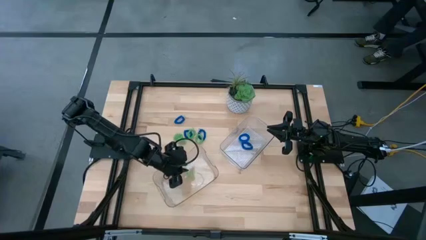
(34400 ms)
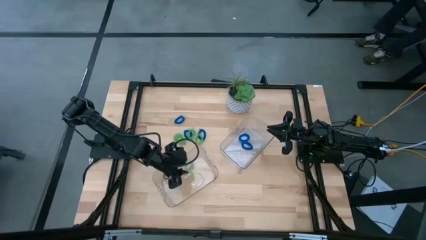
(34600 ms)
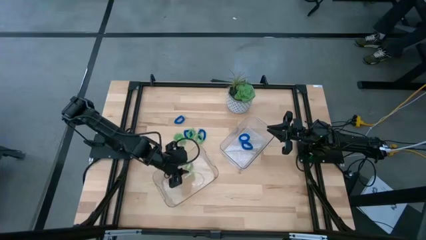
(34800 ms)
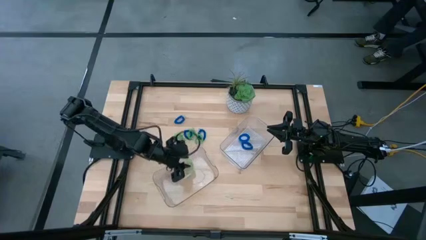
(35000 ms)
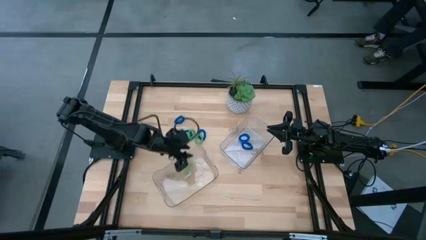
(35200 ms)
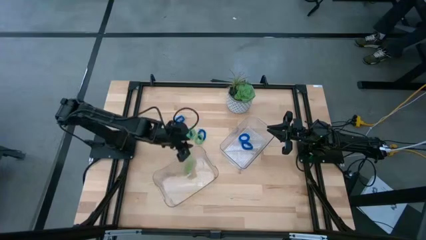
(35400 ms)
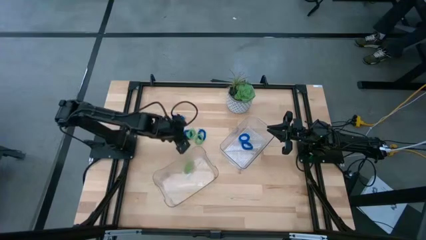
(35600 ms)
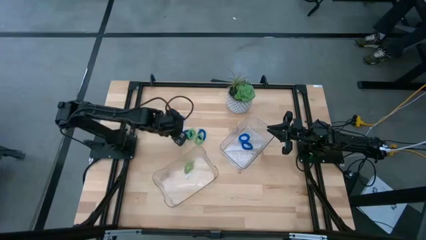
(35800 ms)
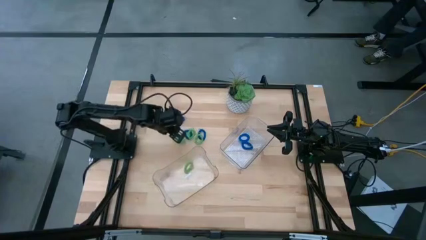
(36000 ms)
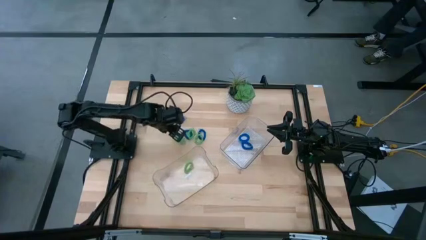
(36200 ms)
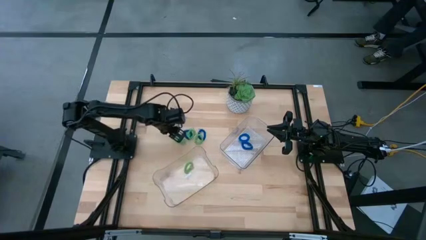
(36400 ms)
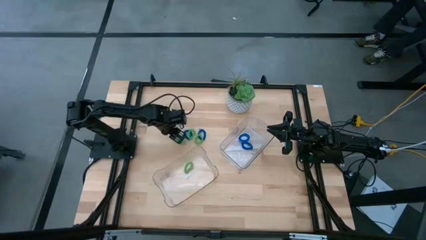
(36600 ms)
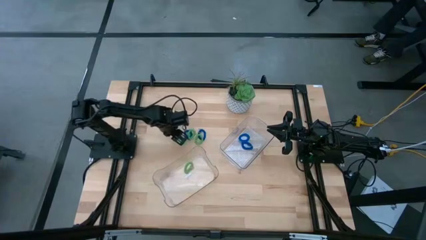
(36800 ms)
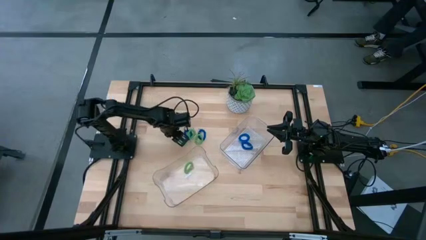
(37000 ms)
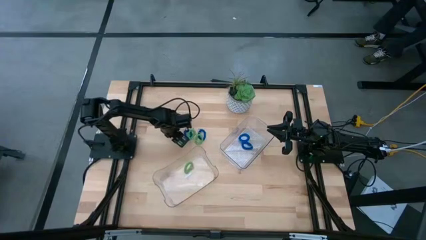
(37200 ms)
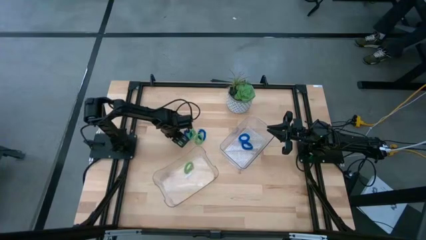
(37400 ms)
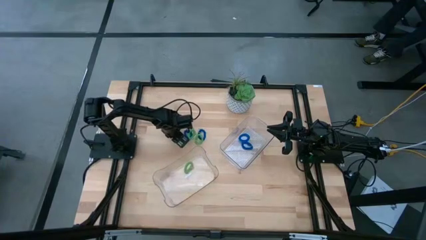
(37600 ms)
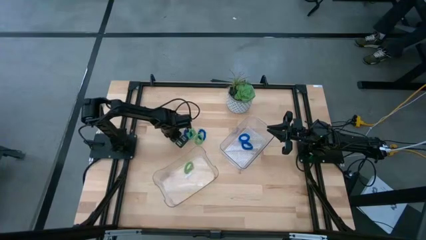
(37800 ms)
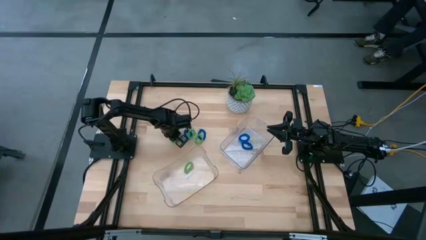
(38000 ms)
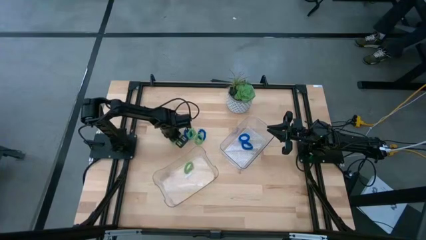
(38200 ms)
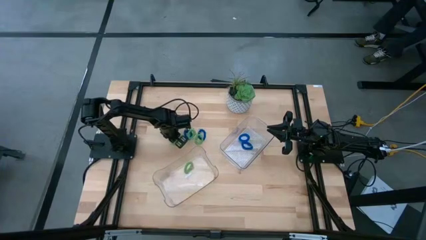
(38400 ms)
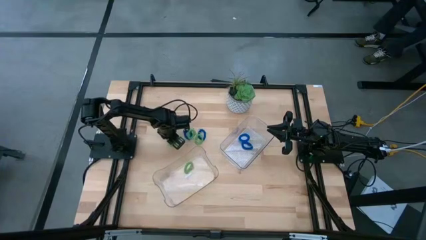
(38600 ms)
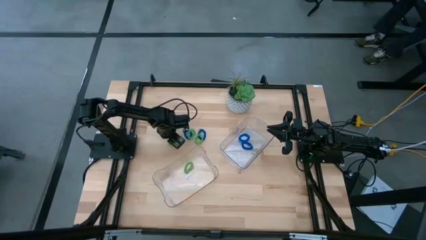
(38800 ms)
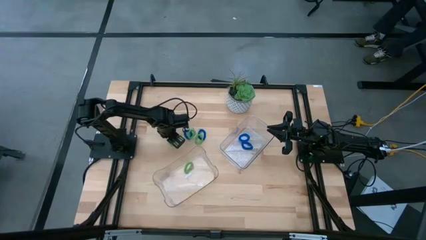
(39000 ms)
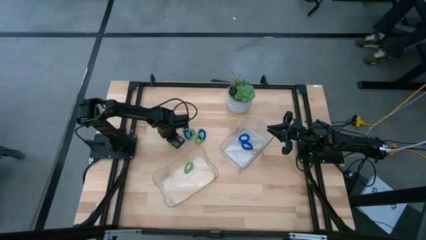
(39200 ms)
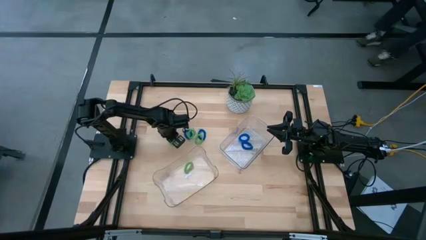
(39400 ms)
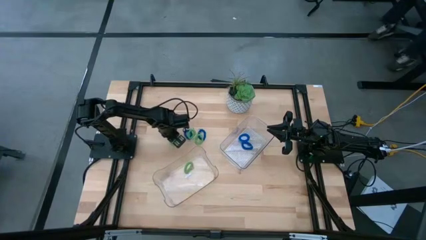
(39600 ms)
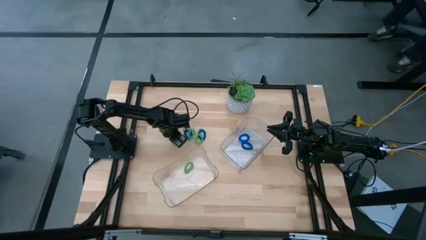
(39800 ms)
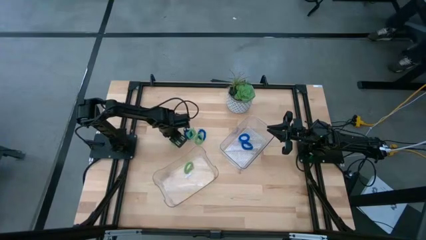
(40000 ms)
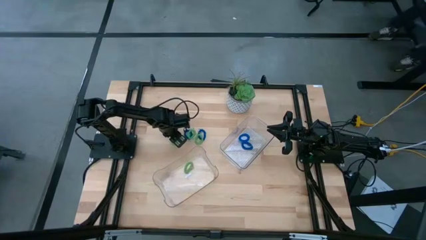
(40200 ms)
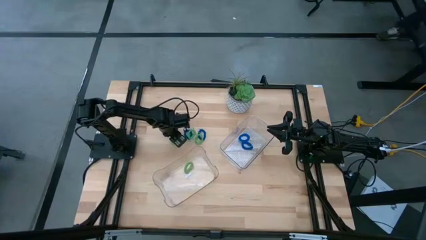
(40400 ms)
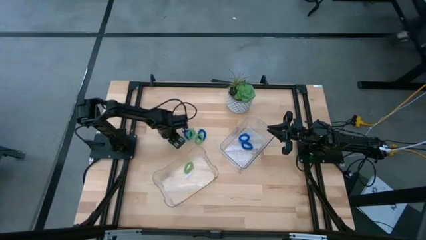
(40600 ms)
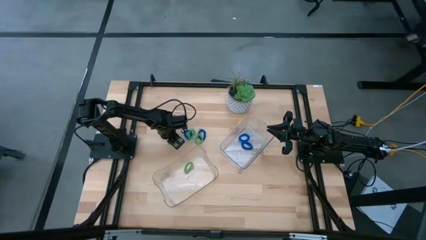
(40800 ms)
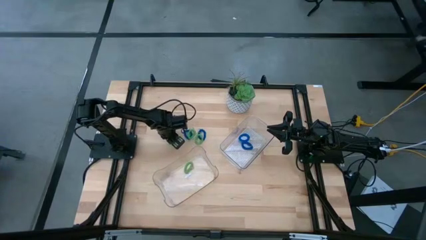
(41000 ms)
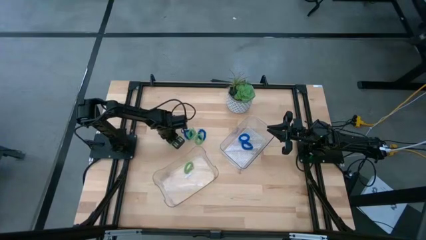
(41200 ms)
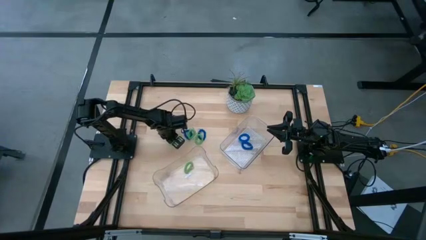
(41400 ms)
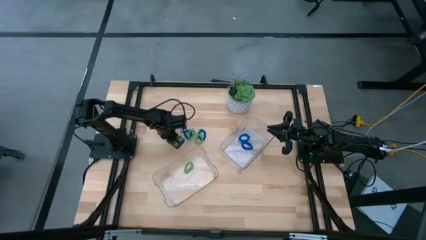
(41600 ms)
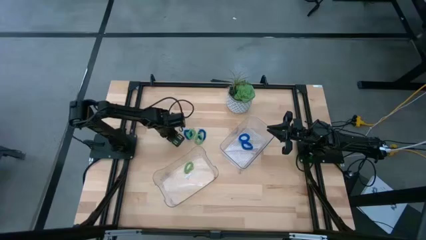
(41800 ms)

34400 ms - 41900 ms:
Task: Sort spring keychains
Put the green spring keychain into the bottom transparent bin

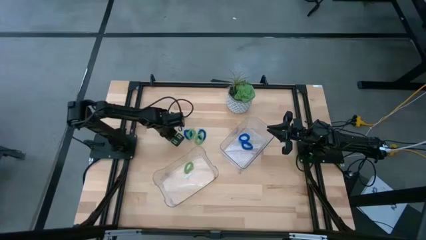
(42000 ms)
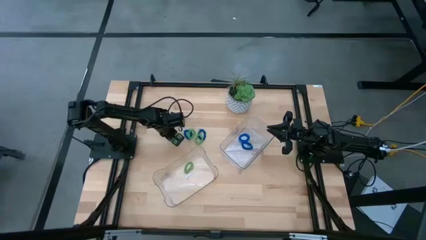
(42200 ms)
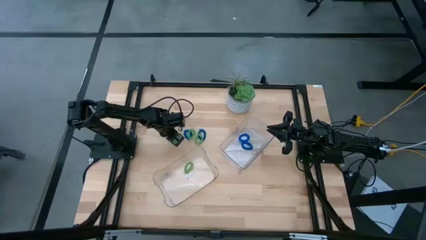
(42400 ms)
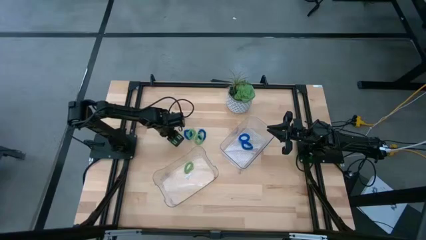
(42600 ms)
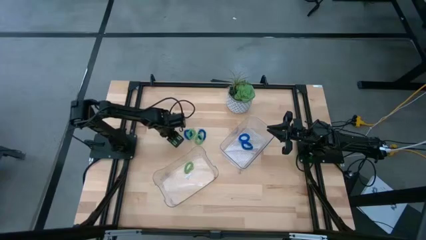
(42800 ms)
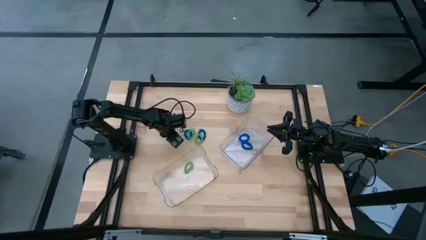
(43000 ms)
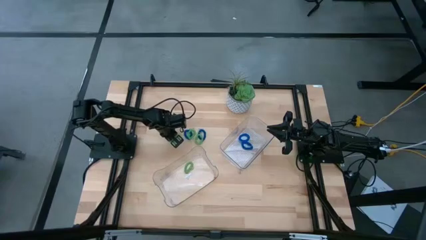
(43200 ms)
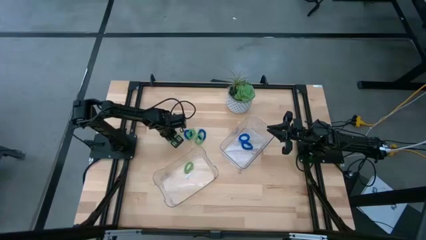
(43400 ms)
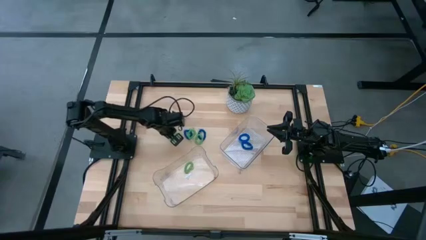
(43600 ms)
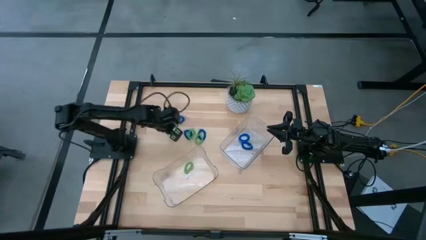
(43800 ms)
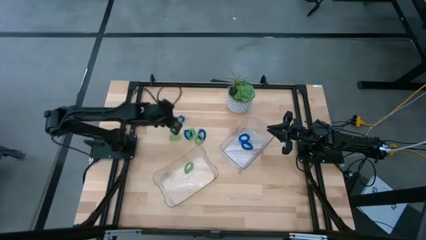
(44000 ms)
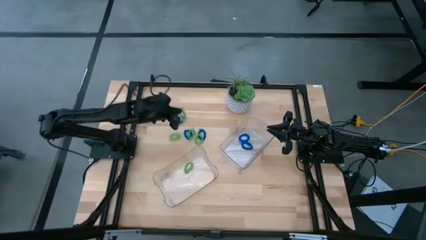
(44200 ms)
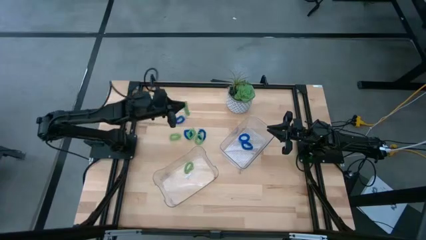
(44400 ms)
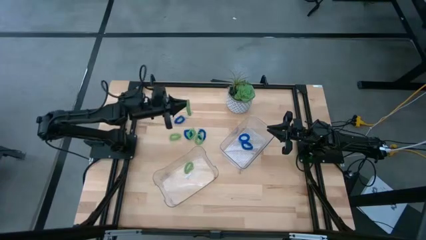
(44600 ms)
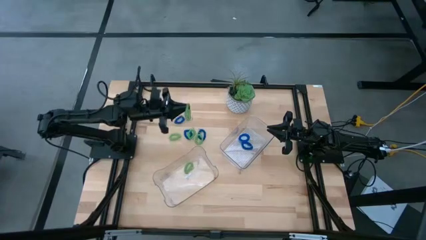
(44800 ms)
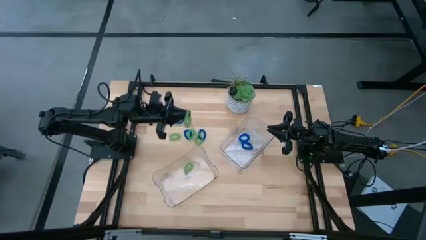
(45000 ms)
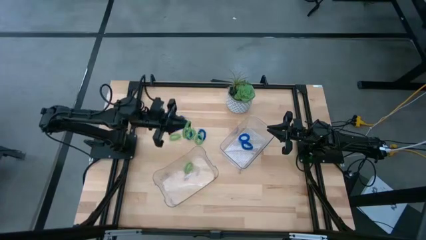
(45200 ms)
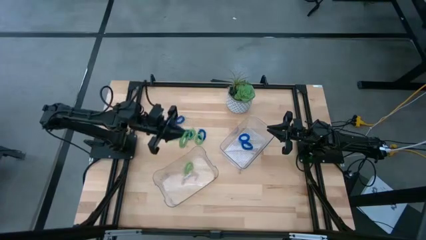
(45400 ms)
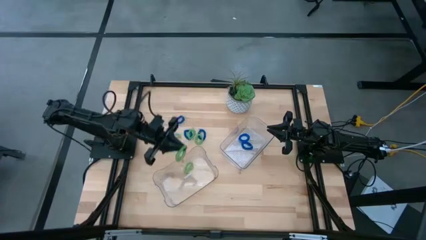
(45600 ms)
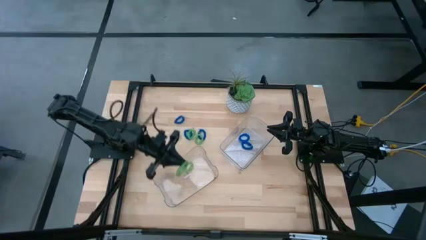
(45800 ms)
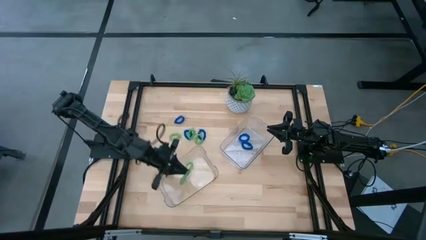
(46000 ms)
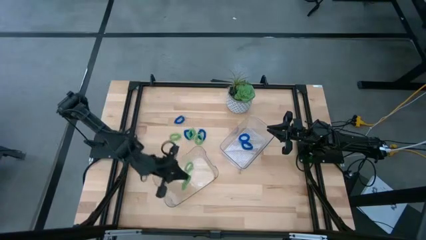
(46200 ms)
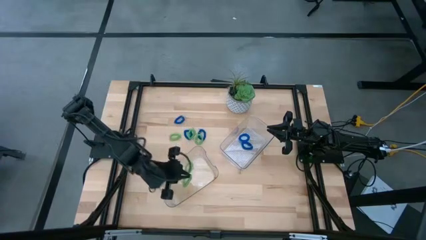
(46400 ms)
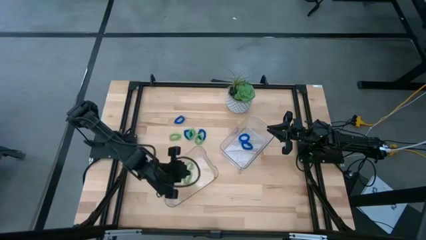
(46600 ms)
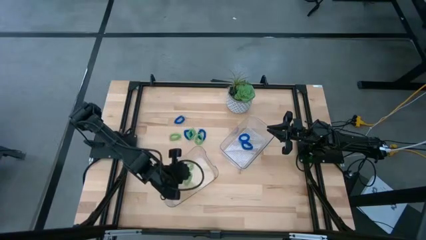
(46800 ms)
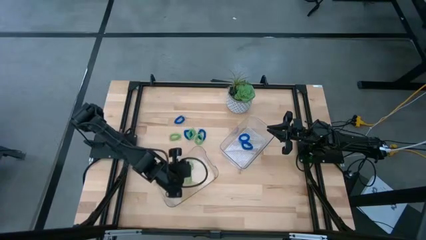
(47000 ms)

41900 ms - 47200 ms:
Put the green spring keychain into the bottom transparent bin

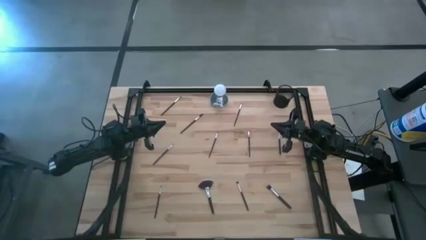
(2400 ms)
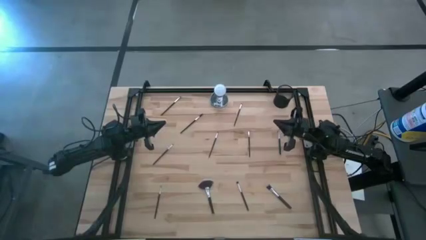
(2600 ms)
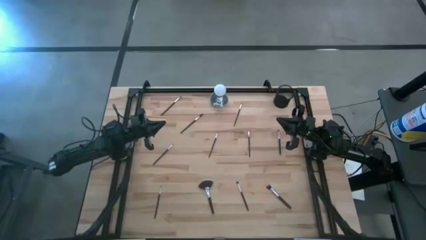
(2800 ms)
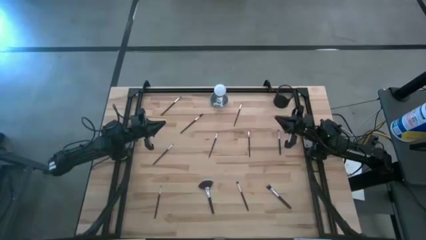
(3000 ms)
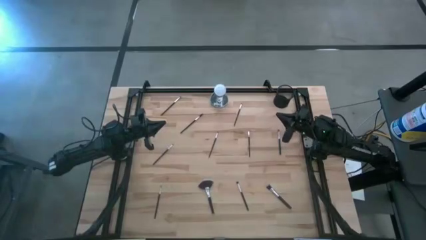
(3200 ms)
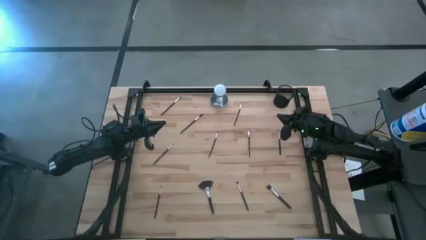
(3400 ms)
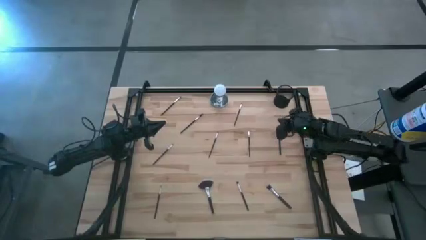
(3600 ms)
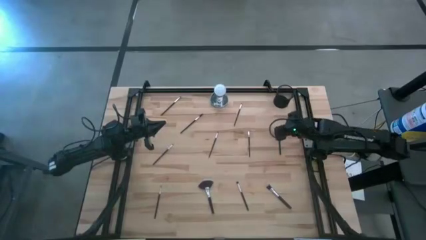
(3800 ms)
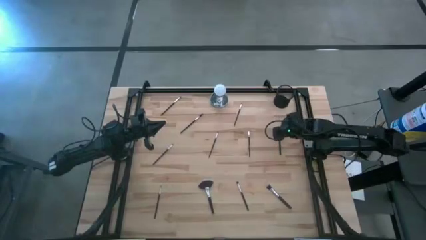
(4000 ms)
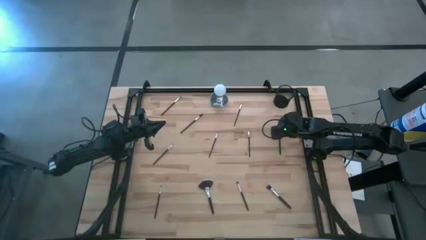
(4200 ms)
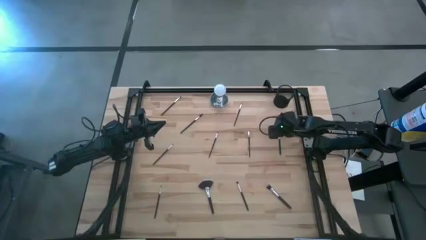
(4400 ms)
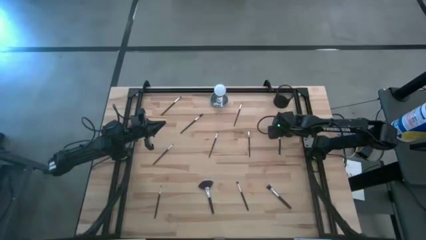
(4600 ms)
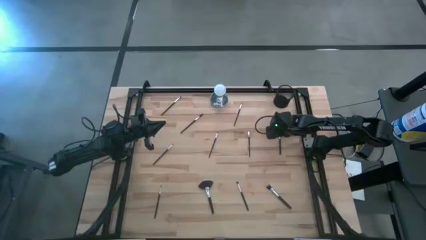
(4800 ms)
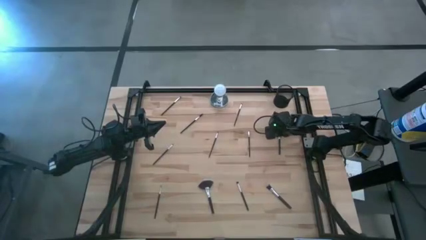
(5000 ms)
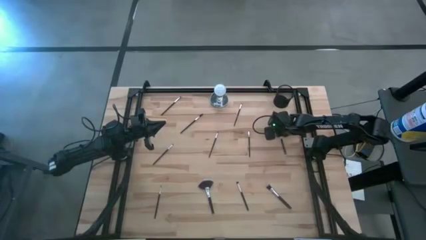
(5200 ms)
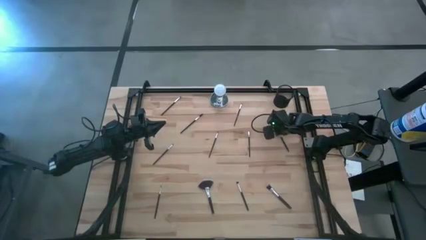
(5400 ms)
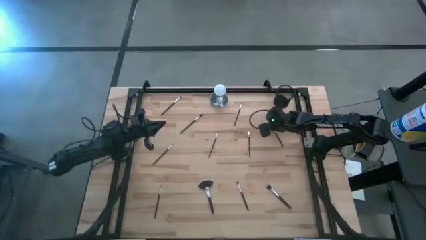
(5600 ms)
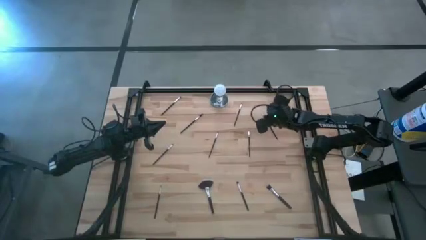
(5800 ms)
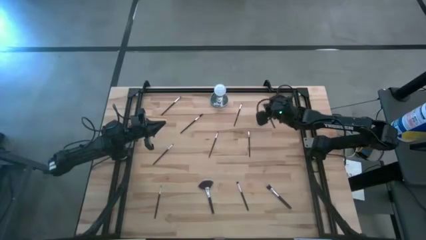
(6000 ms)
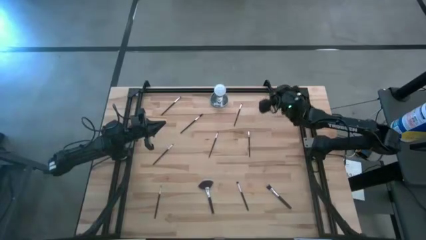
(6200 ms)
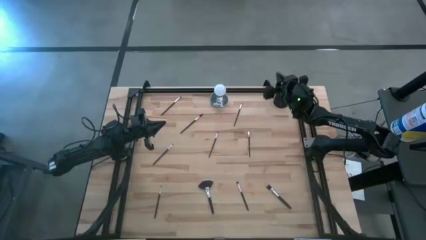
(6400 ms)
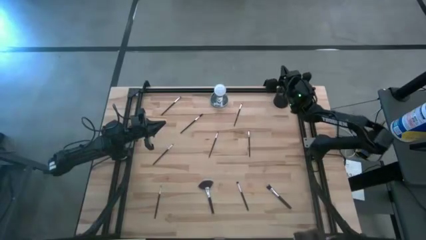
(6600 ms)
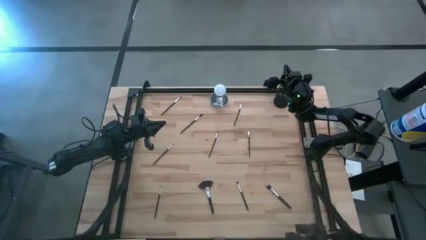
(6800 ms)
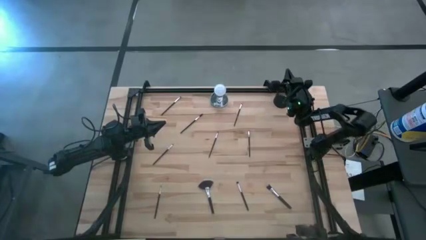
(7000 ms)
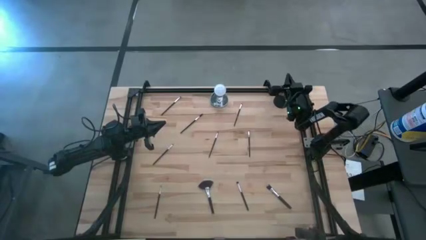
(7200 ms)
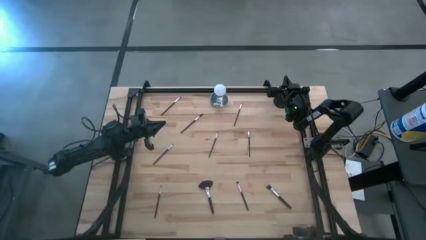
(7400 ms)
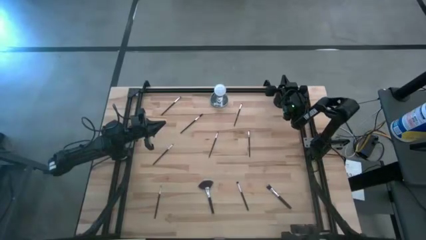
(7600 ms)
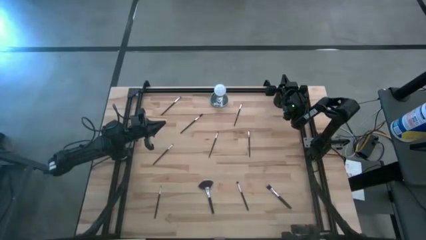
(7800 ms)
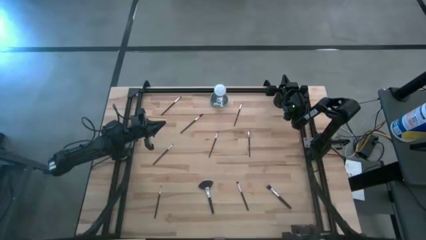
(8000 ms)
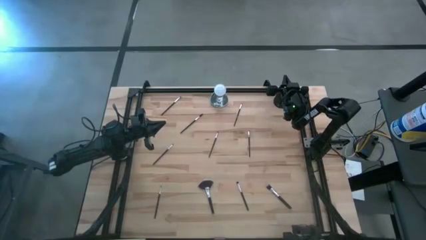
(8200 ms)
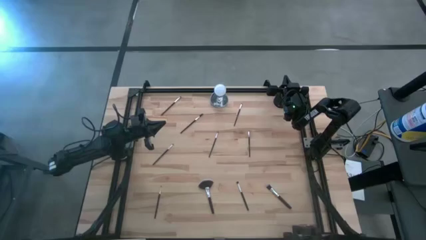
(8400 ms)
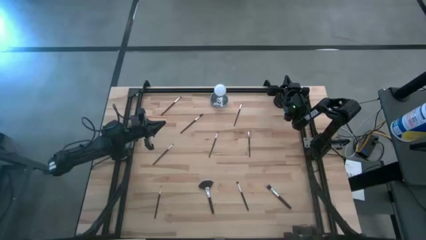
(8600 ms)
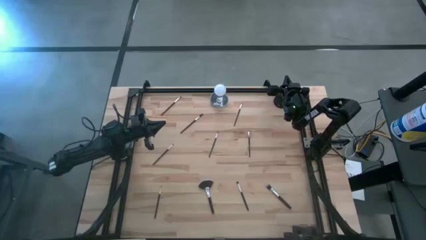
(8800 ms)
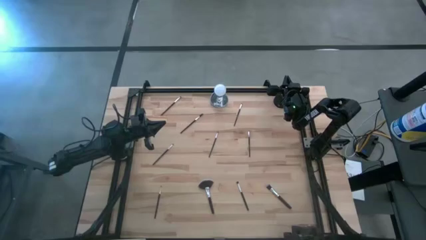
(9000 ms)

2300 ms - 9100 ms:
Task: Pick & Place Makeup Supplies
Put the makeup brush into the makeup holder
